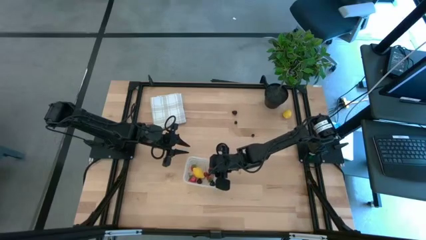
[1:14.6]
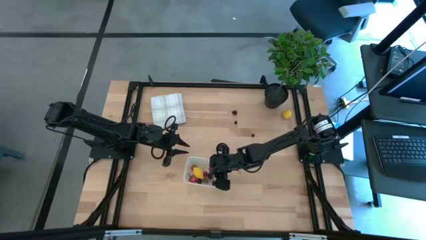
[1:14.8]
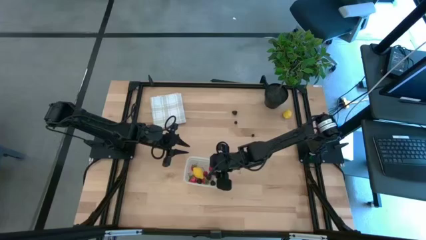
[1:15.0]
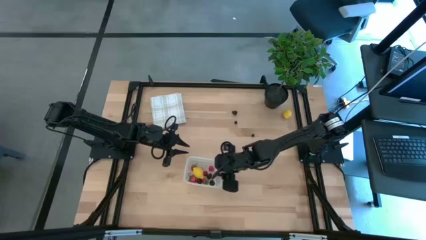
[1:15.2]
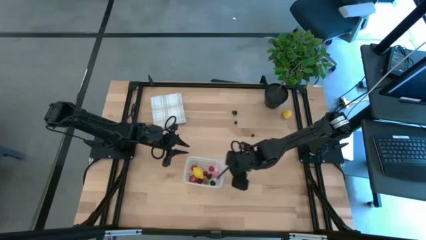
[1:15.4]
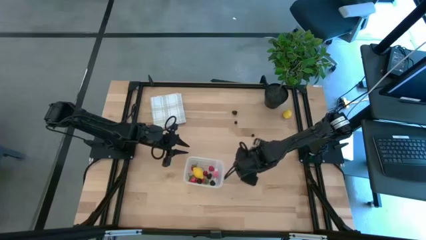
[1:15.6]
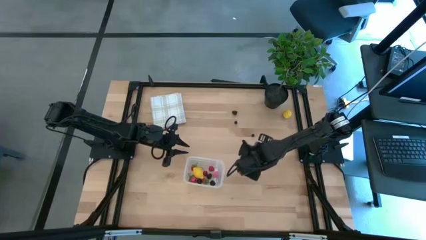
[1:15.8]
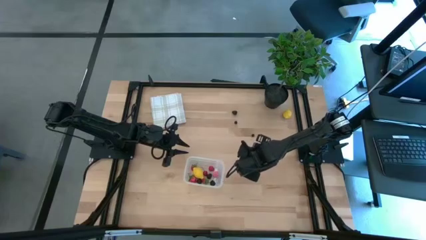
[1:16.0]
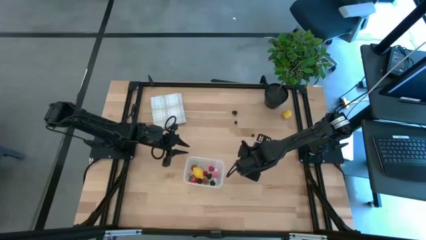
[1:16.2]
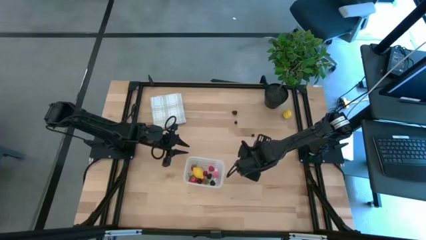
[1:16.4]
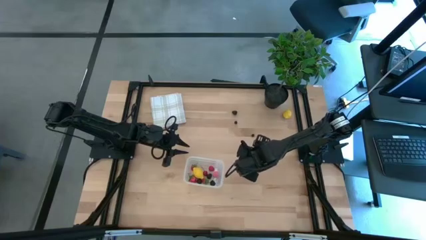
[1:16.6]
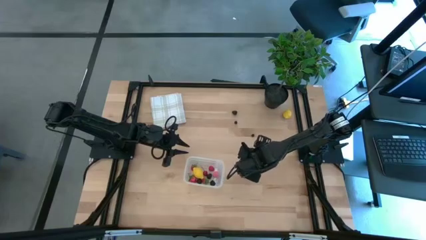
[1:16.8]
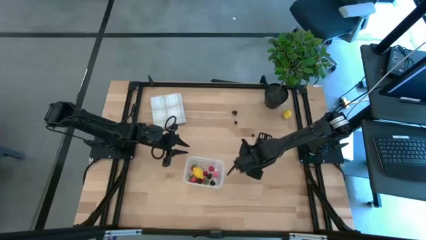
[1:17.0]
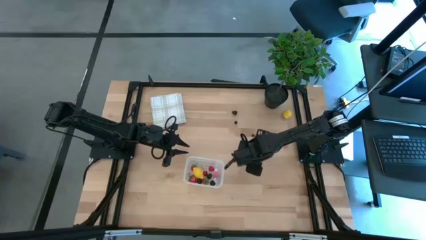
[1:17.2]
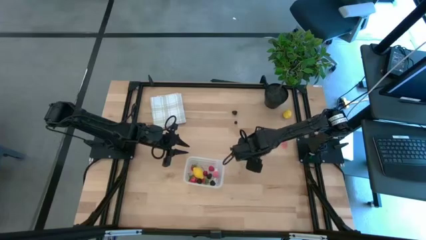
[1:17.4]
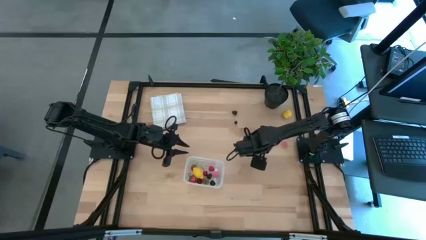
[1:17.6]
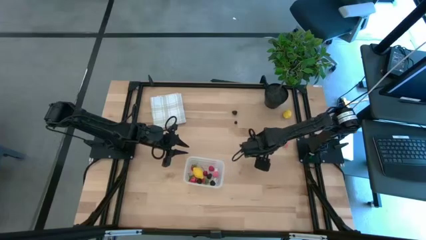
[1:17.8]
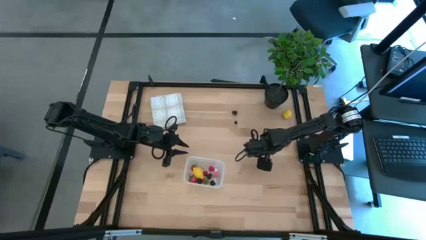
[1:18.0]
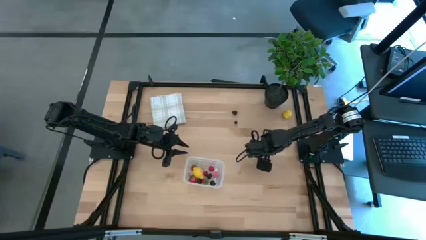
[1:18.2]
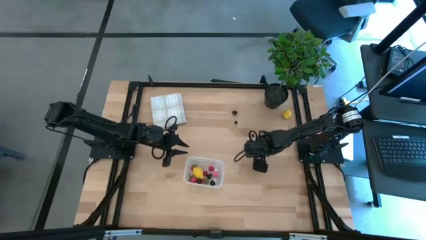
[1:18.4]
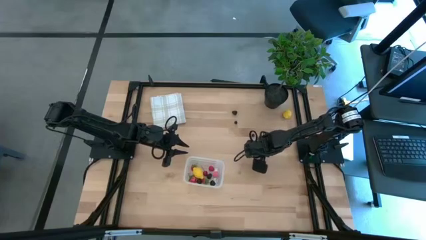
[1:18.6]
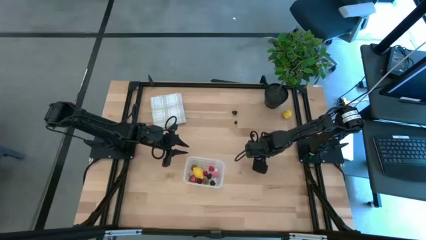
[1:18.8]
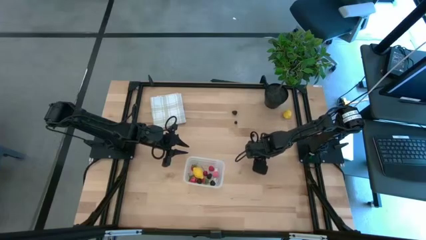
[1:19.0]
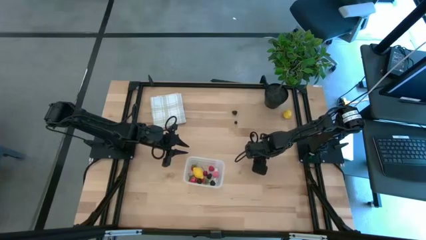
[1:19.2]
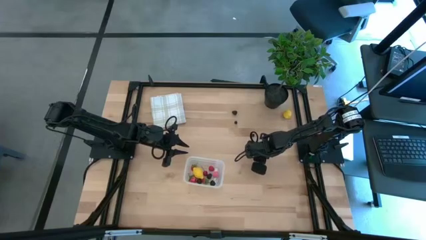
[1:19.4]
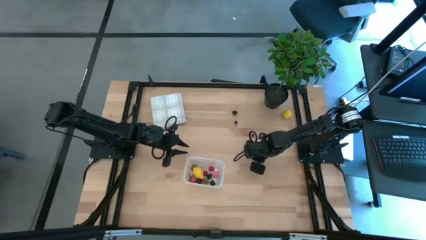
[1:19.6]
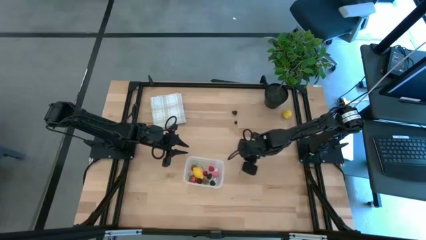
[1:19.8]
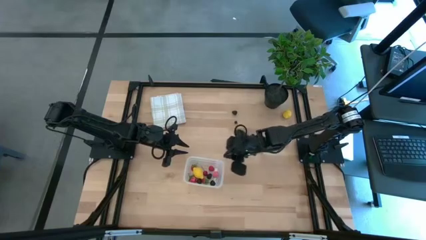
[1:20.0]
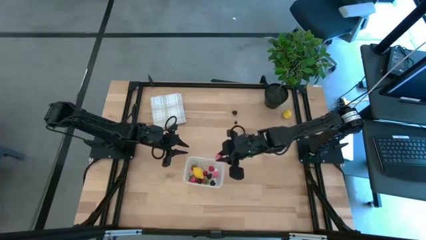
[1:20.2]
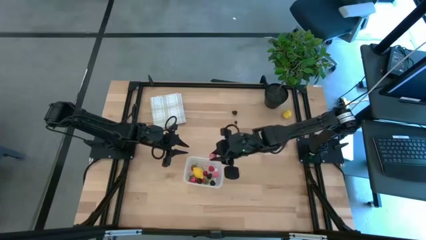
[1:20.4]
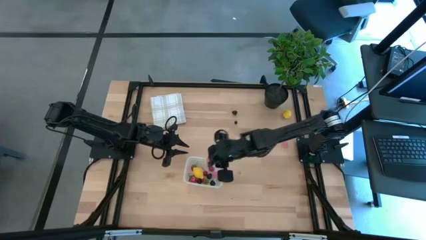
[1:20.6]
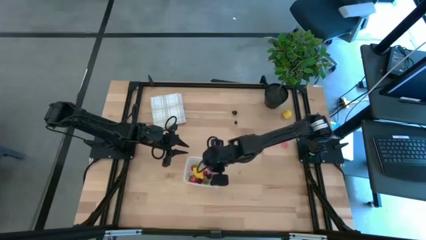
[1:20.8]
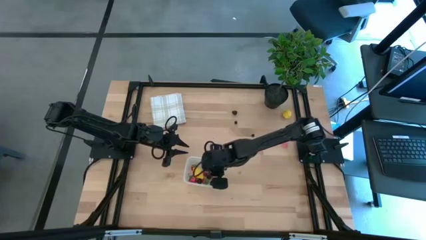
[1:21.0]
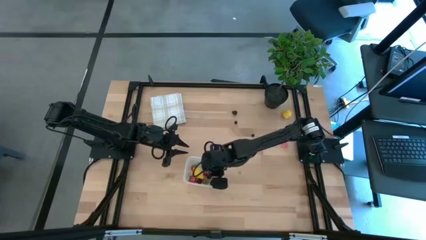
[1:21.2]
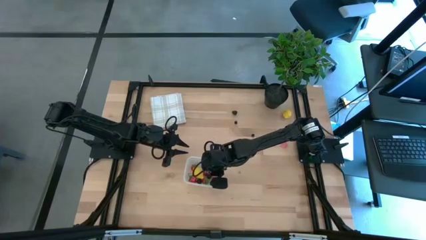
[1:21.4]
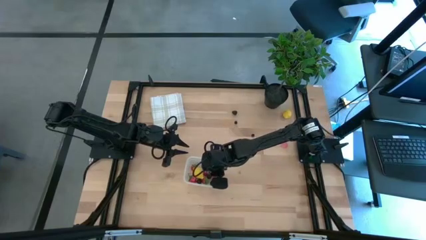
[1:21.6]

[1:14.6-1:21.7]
Task: Pick and placing Produce into tupperware
Put the left peach into the transparent bin

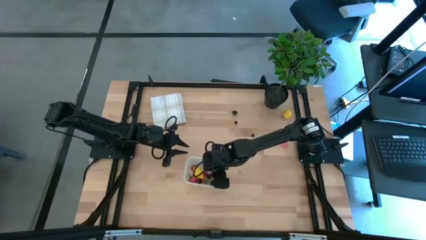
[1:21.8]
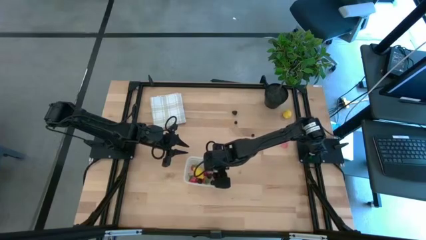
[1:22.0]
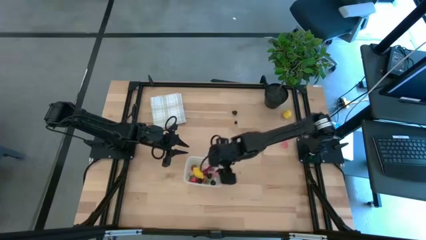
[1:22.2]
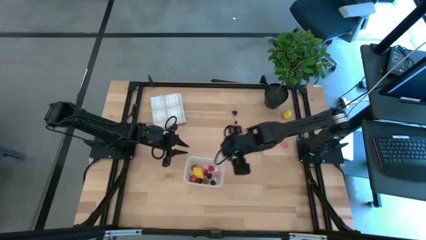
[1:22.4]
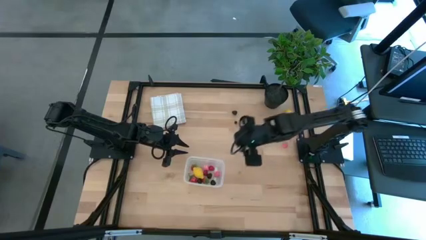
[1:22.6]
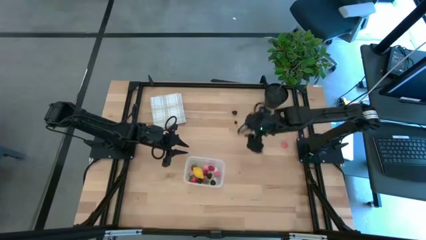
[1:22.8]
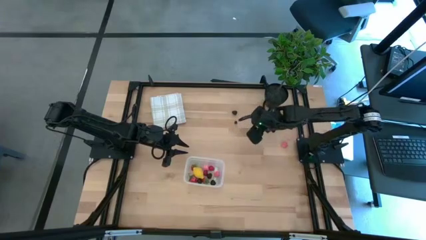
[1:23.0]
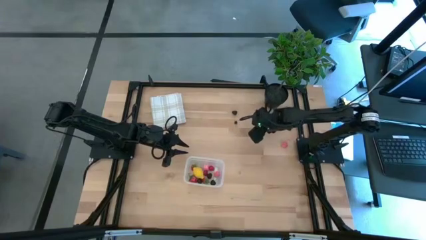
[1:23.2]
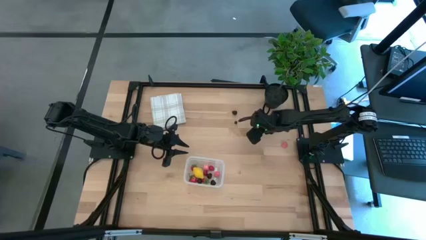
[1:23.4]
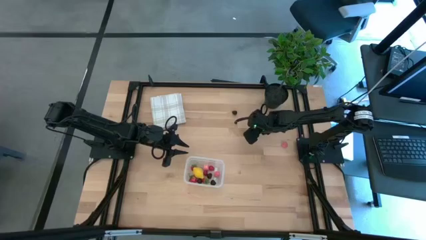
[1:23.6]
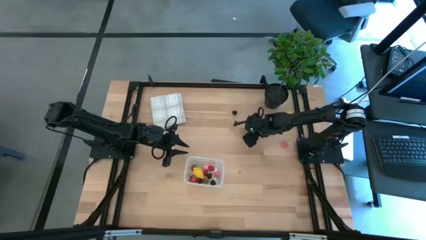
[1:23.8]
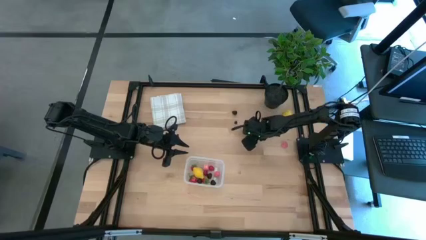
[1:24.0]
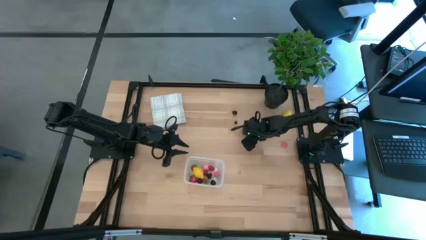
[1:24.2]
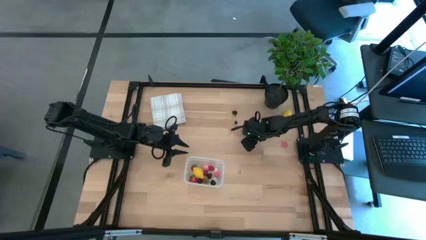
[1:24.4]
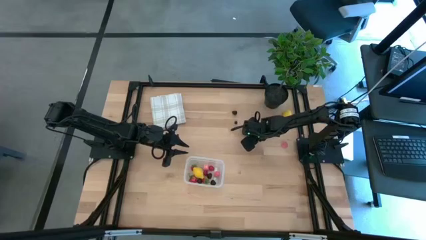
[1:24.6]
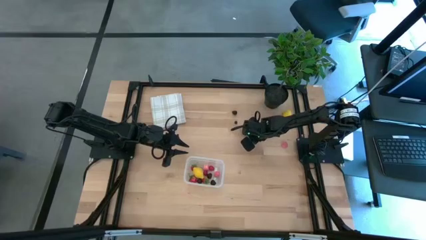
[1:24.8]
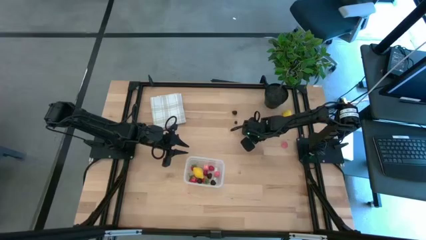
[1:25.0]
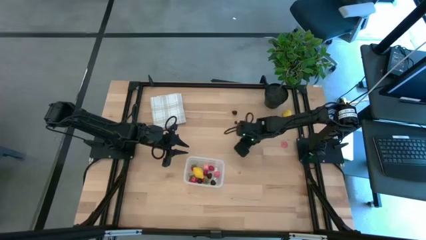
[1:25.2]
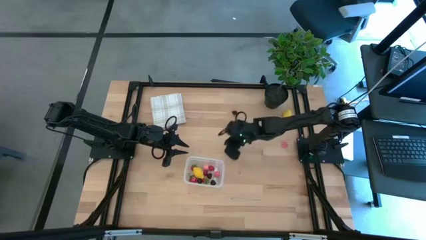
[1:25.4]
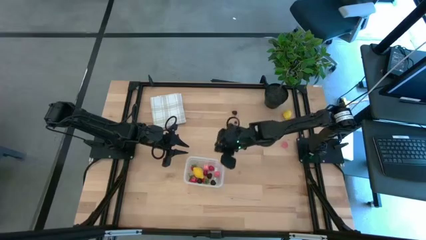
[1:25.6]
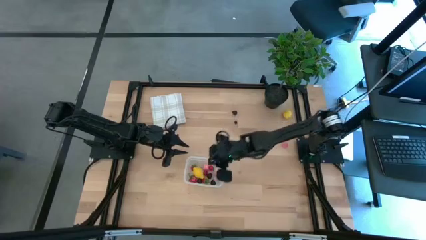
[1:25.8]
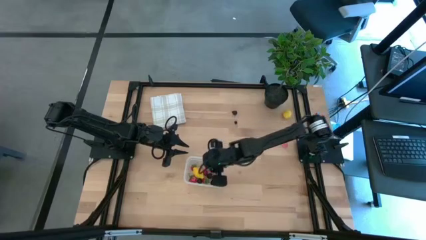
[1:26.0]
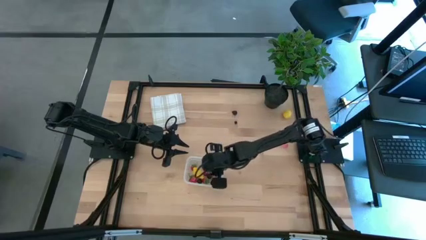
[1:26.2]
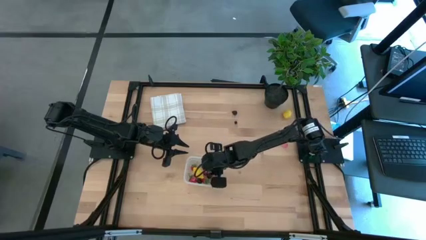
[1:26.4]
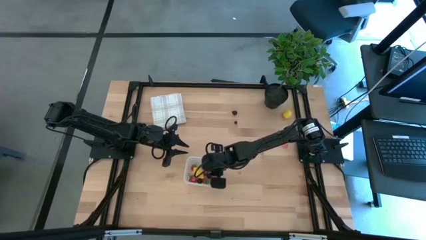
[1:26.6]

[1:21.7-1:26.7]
Put the bottom blueberry into the transparent bin

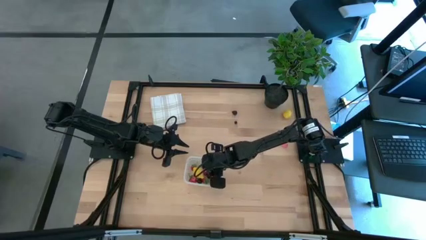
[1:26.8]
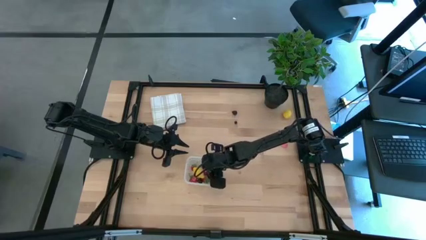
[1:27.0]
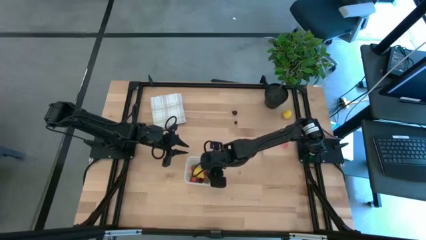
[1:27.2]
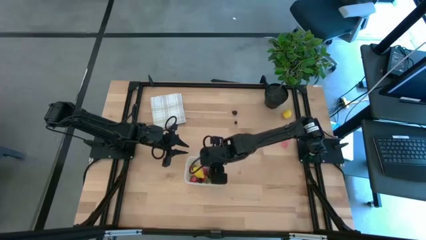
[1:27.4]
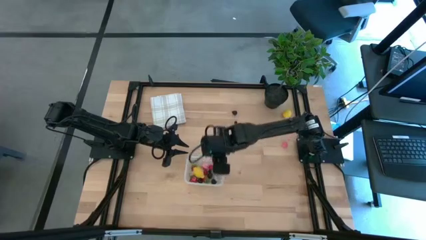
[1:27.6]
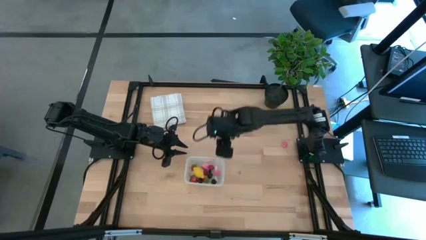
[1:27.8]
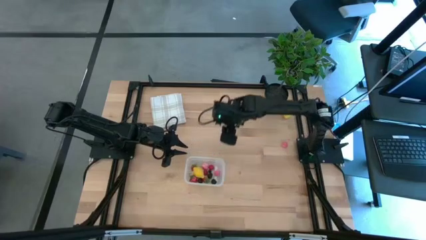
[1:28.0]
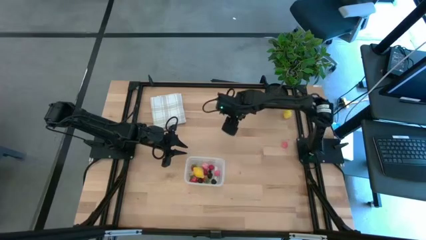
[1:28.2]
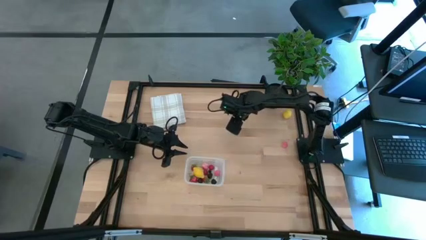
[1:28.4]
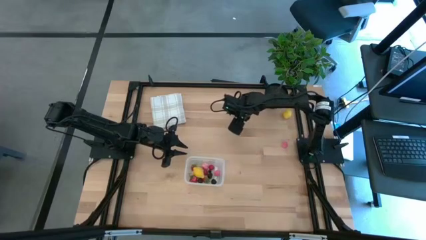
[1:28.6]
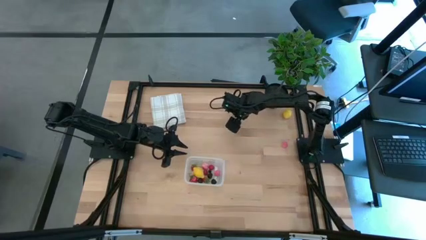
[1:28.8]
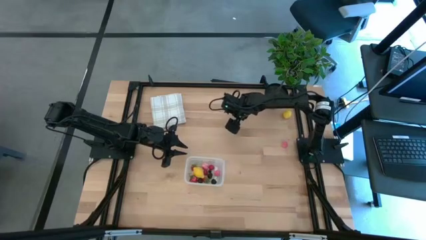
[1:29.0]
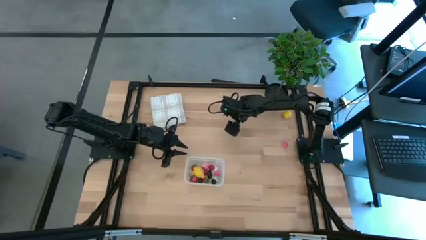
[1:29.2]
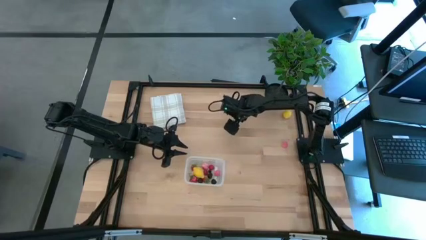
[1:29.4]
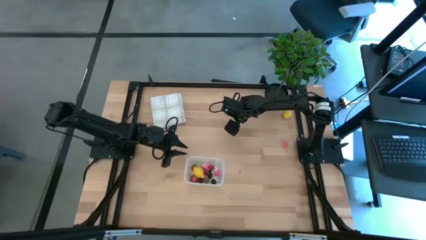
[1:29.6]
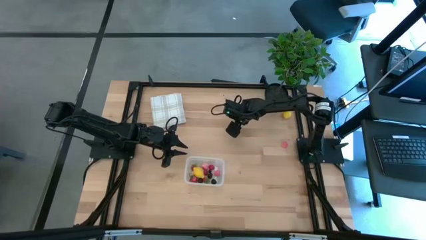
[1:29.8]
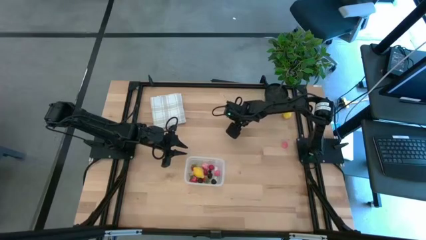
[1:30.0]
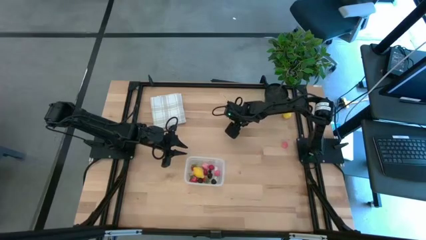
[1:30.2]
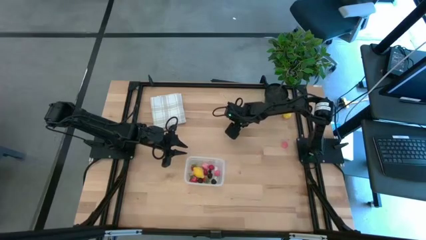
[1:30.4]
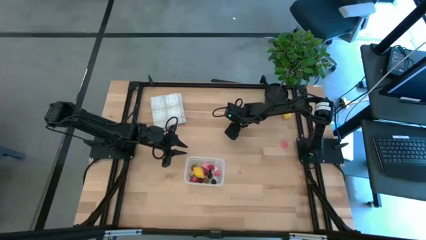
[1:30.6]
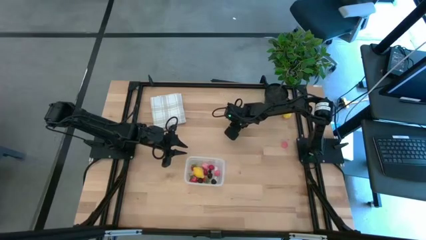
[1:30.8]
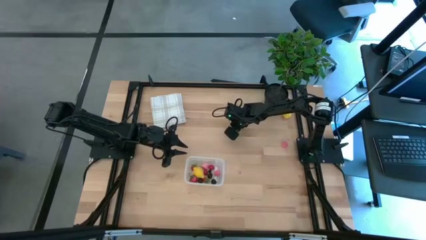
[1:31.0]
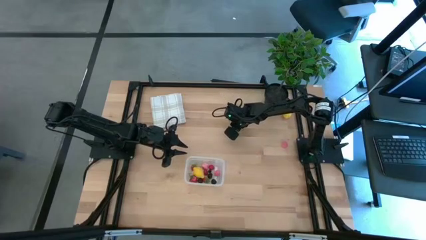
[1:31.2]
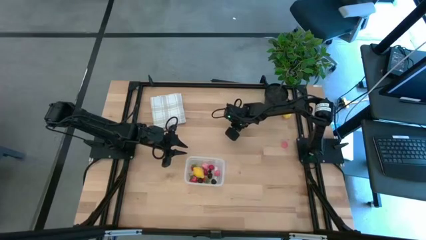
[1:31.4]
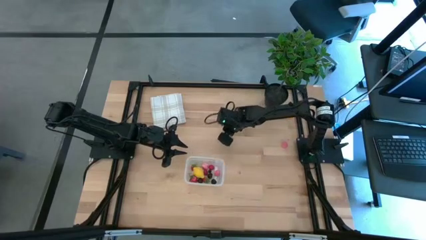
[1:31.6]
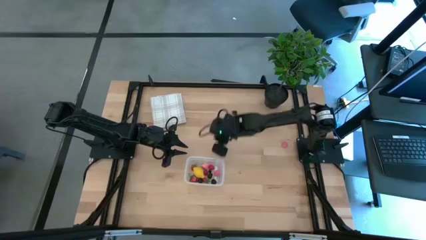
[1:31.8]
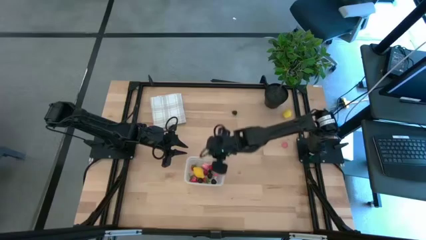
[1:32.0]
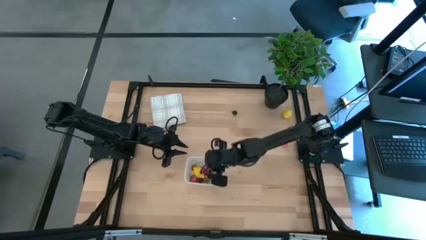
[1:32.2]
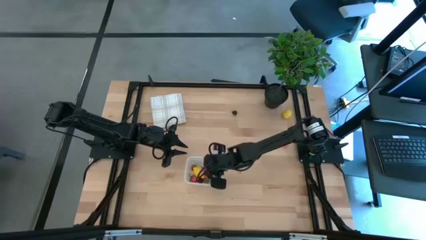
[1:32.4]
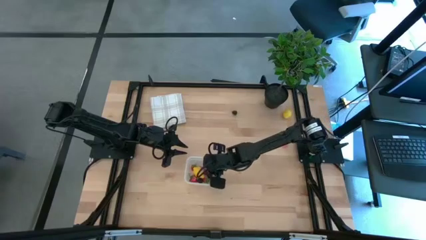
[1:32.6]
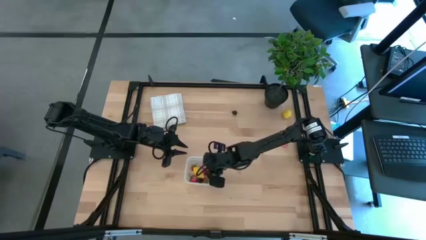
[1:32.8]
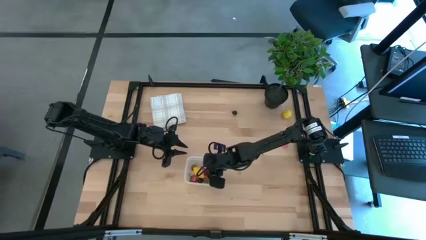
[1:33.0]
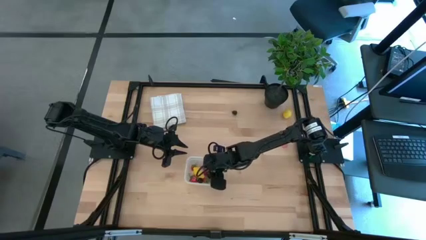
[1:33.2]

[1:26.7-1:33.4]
Put the blueberry into the transparent bin
